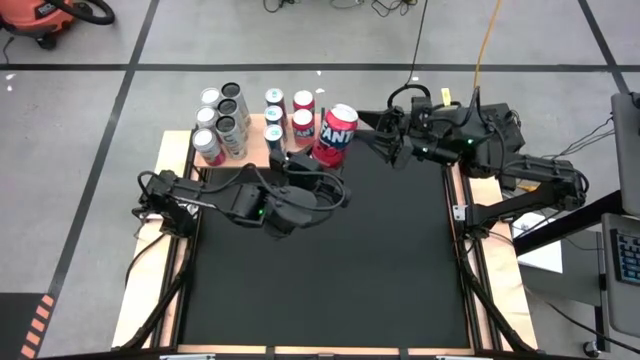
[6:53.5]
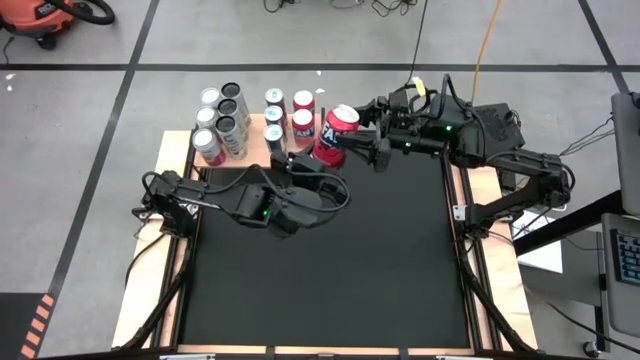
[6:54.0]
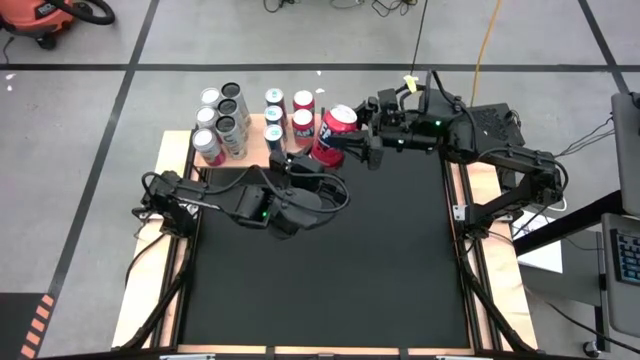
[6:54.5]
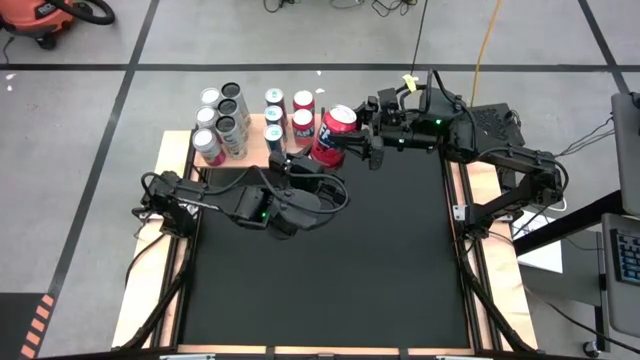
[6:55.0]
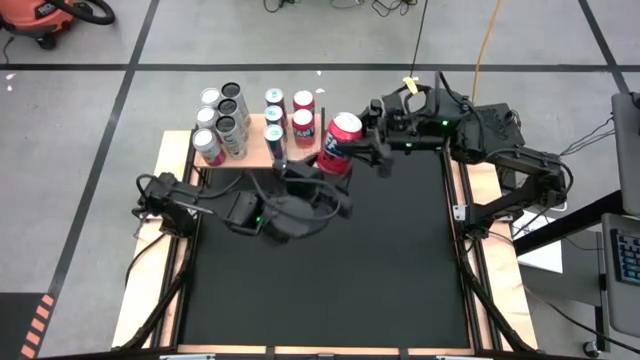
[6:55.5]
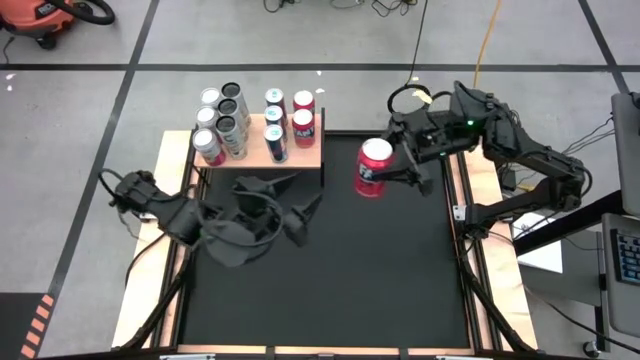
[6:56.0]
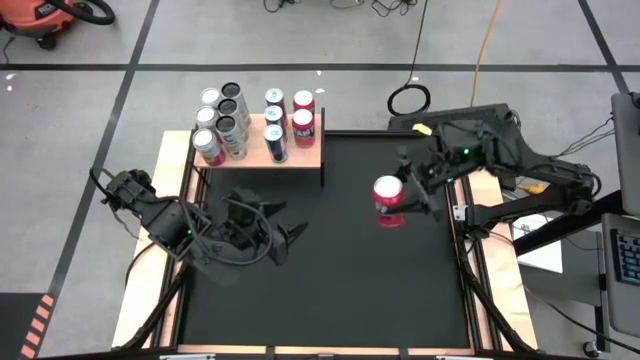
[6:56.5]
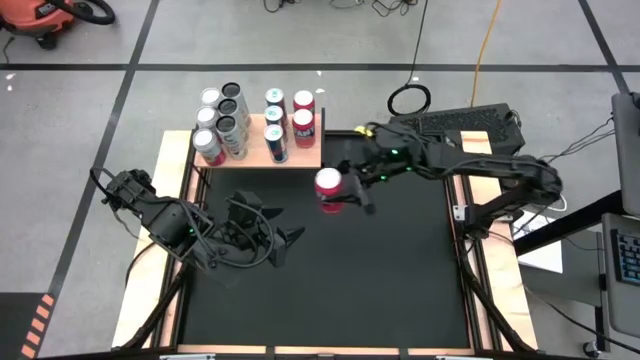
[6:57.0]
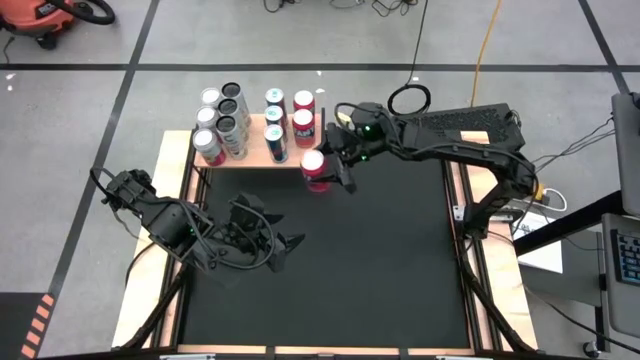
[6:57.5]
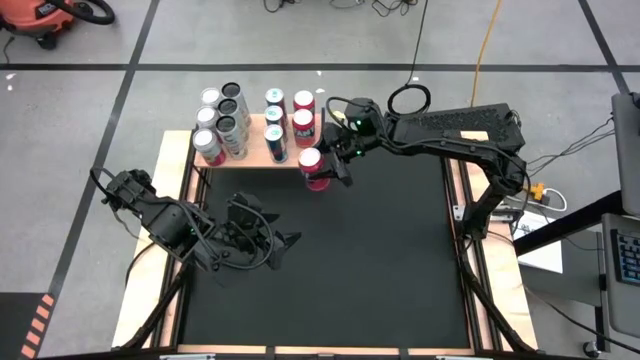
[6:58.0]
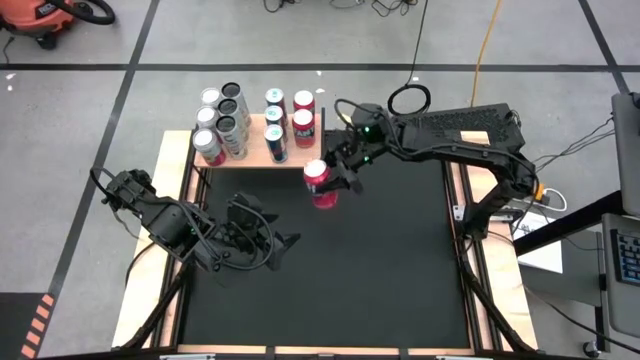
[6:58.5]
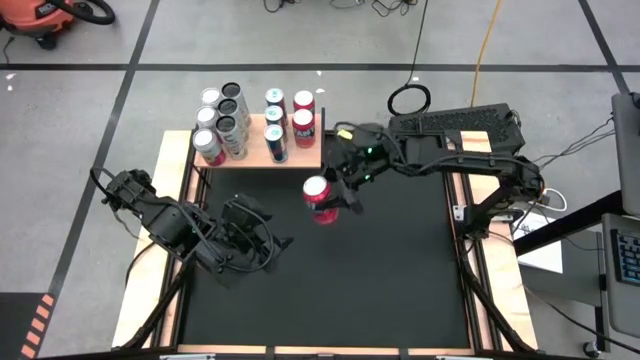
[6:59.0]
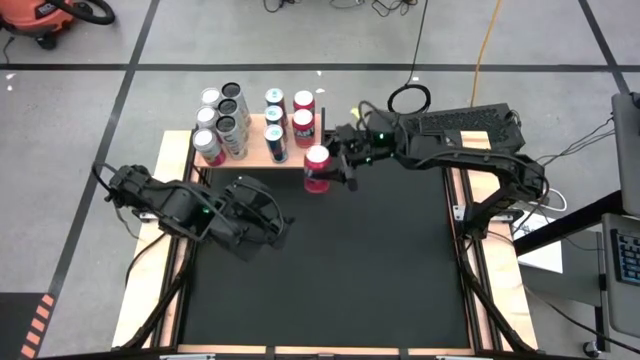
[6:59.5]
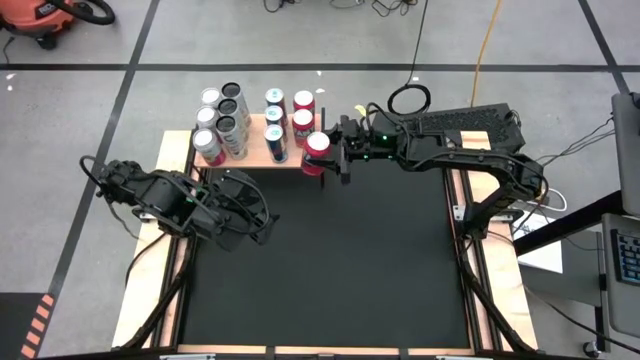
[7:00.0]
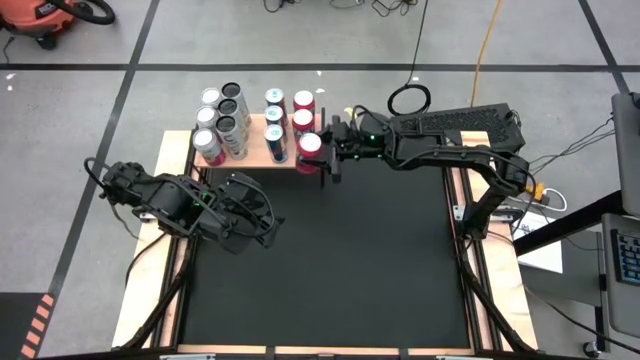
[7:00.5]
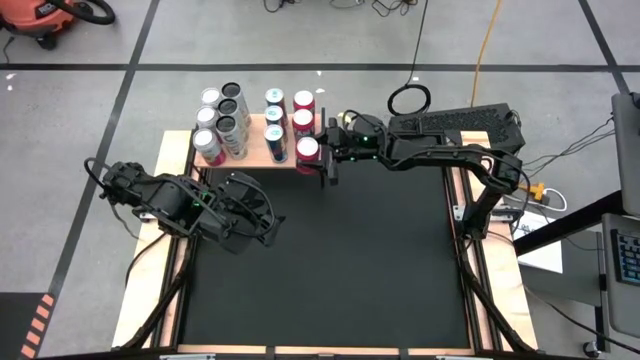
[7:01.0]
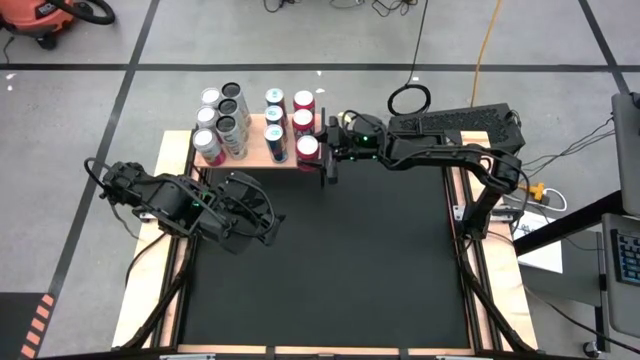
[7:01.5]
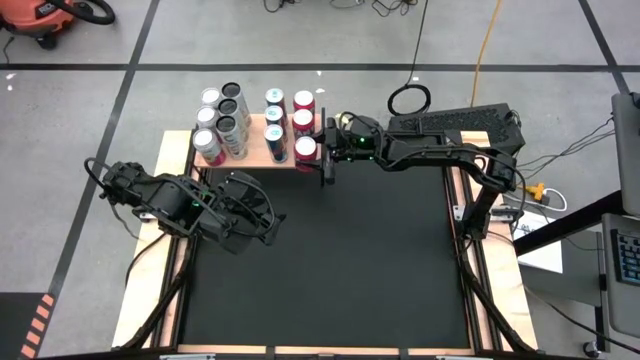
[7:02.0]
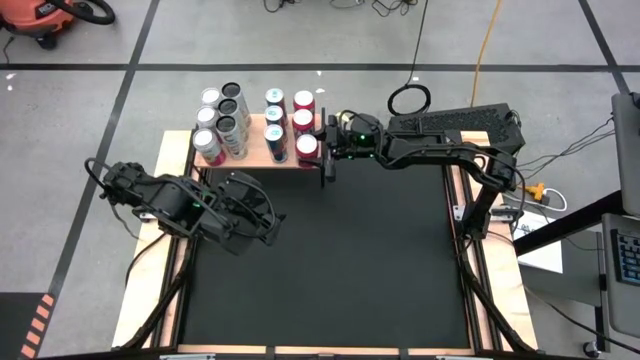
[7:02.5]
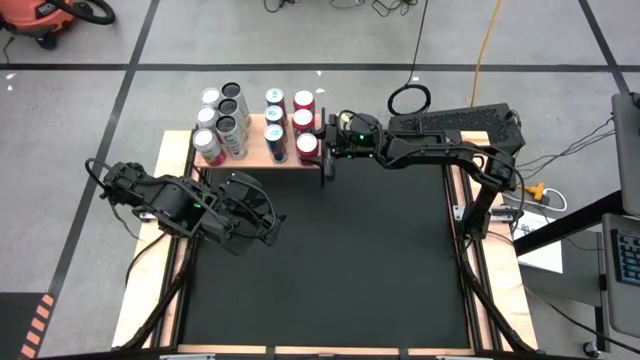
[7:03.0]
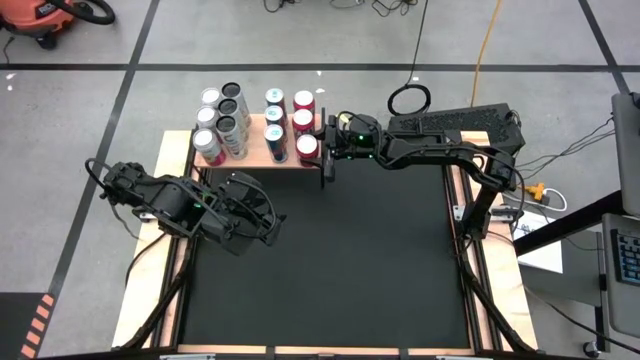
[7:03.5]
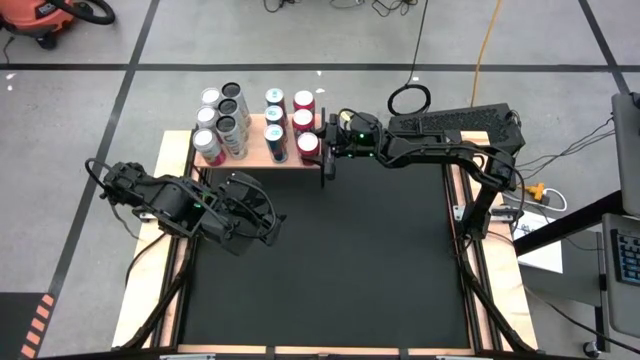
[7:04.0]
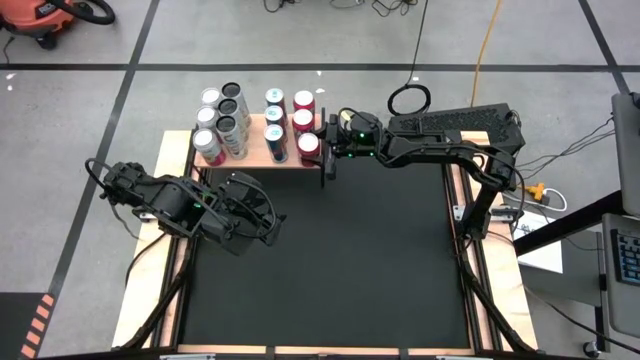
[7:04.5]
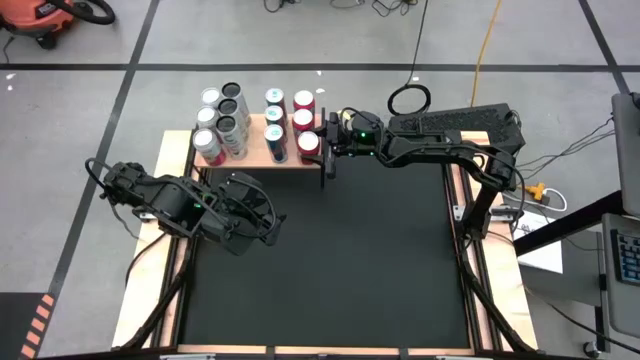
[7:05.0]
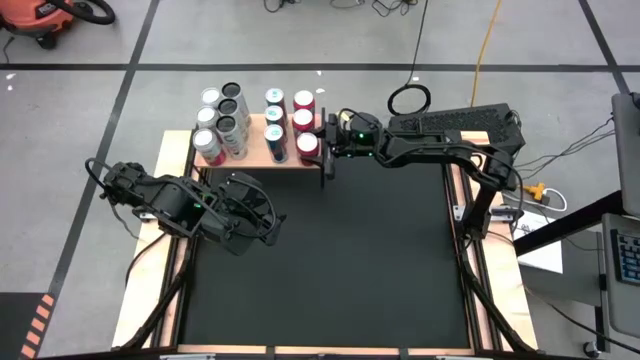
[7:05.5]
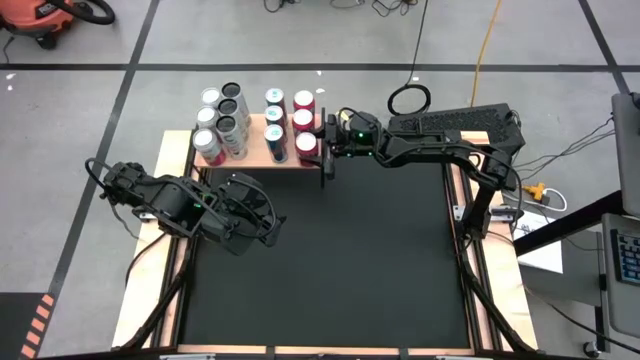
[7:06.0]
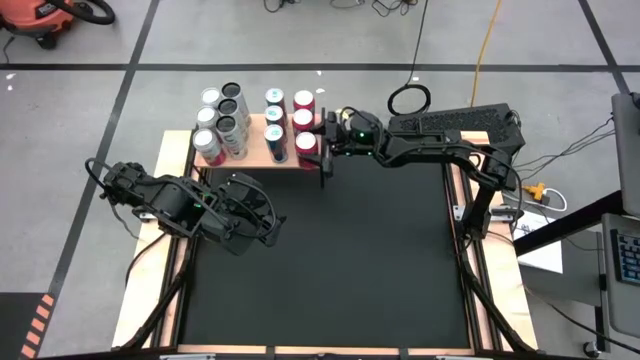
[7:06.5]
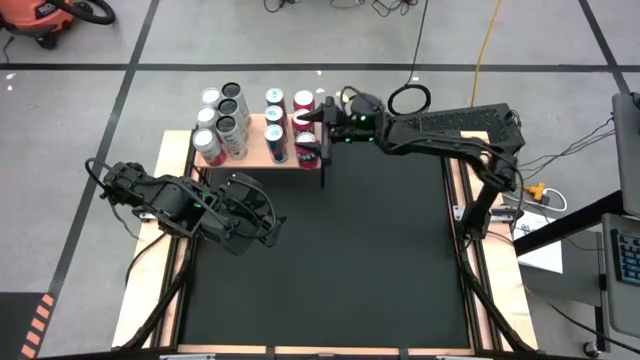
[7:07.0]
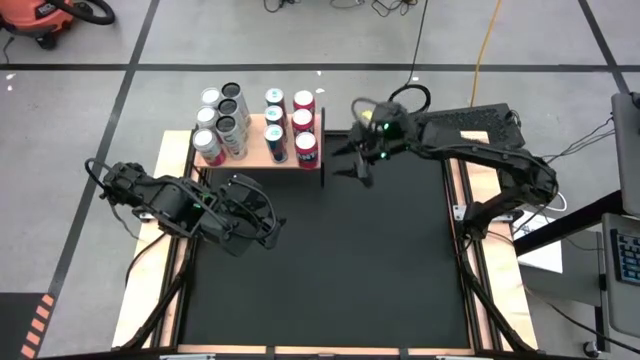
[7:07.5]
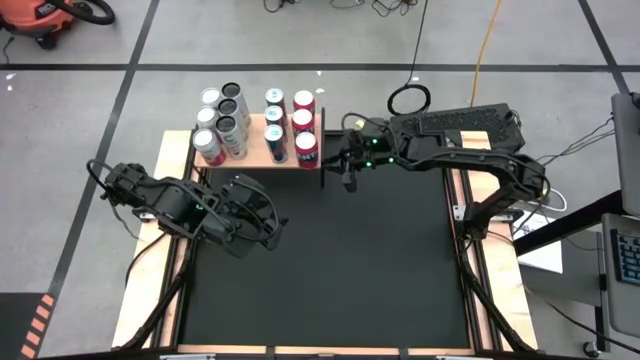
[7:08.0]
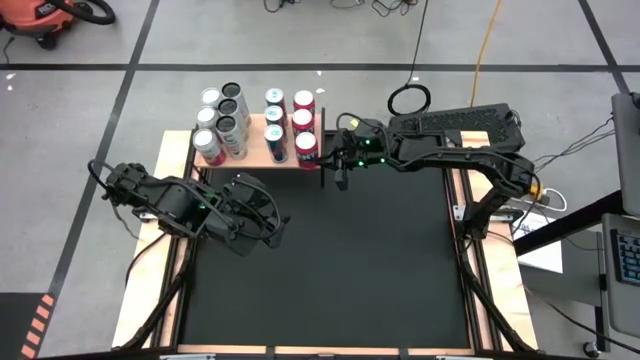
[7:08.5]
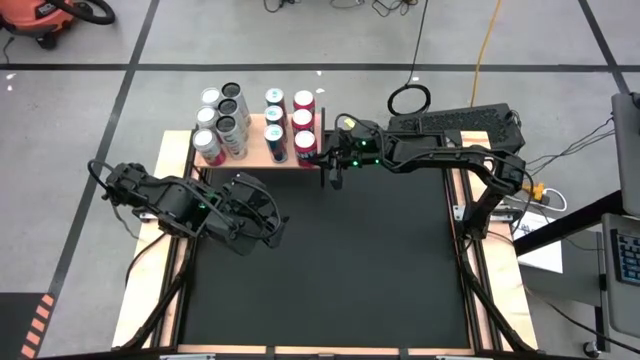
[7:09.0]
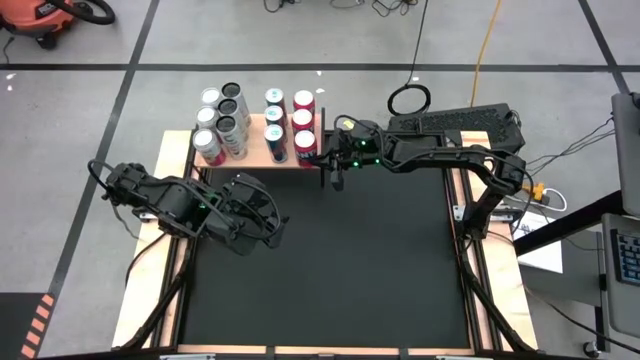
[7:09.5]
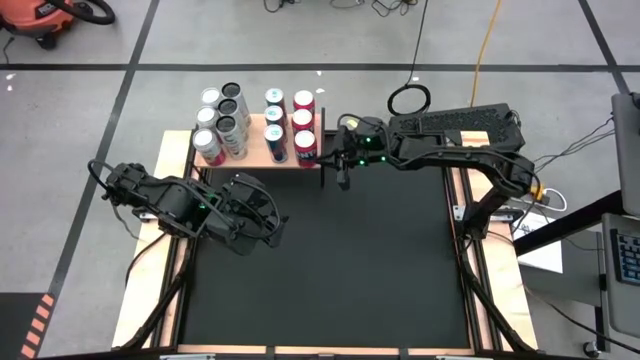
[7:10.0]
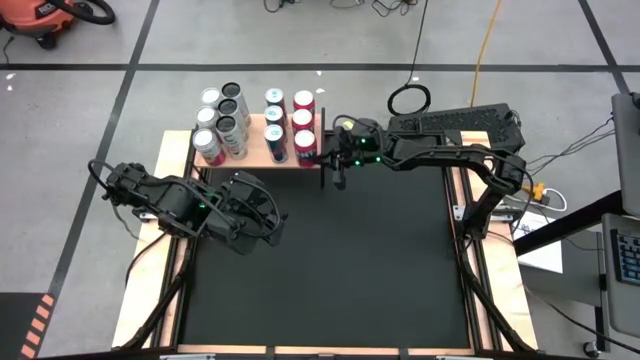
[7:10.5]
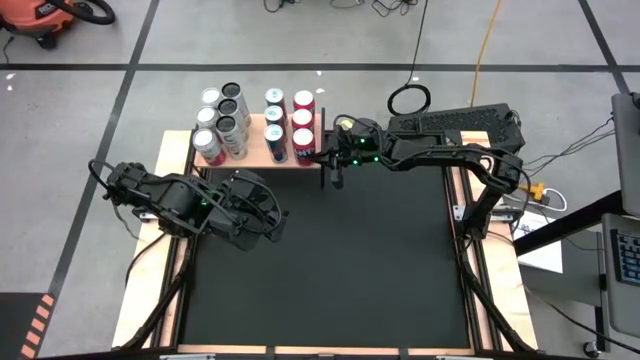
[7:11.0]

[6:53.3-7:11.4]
Task: Place canned beverage on shelf
Put the red soda can on the shelf aligned with the other red soda cans

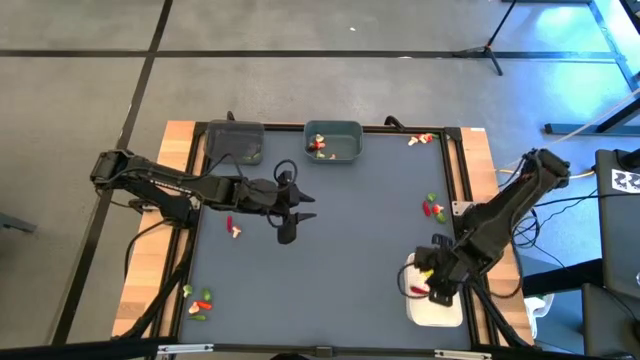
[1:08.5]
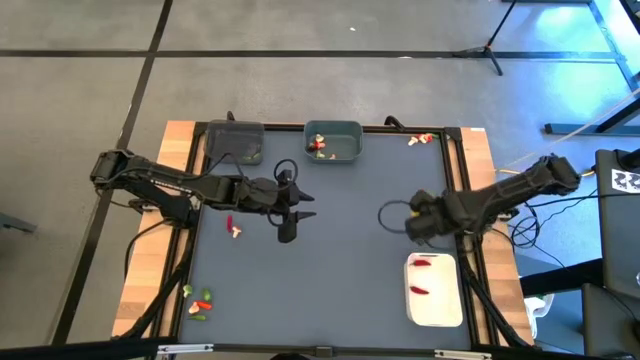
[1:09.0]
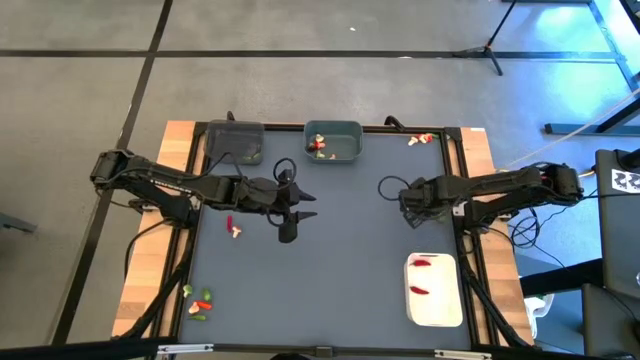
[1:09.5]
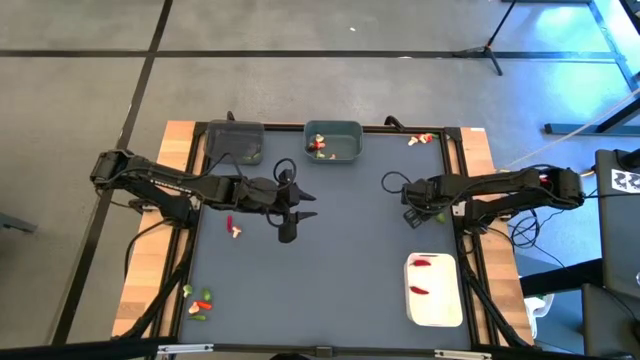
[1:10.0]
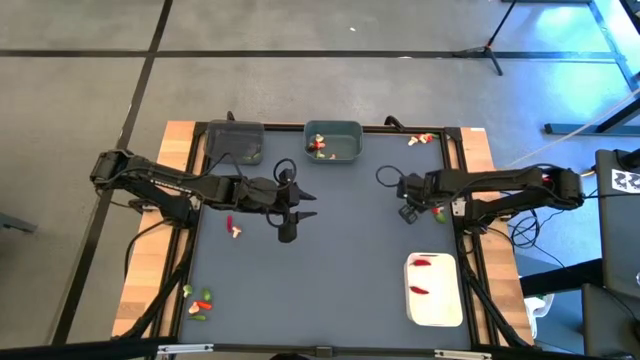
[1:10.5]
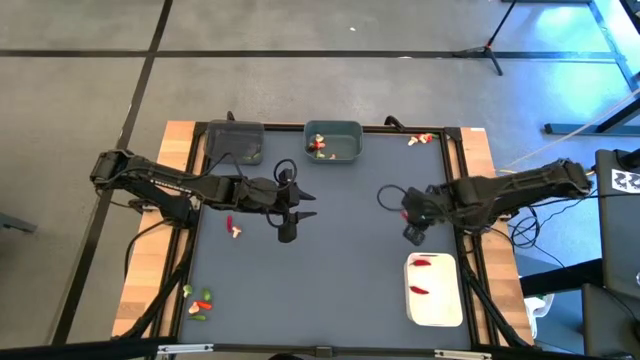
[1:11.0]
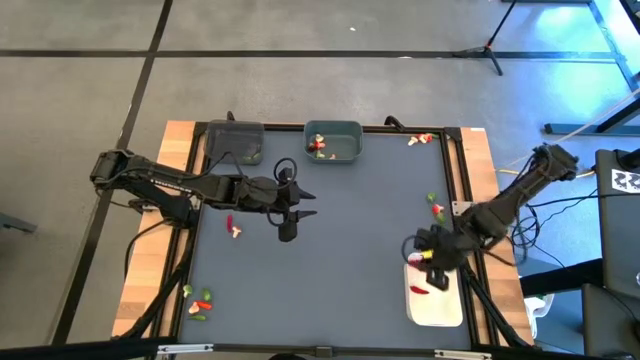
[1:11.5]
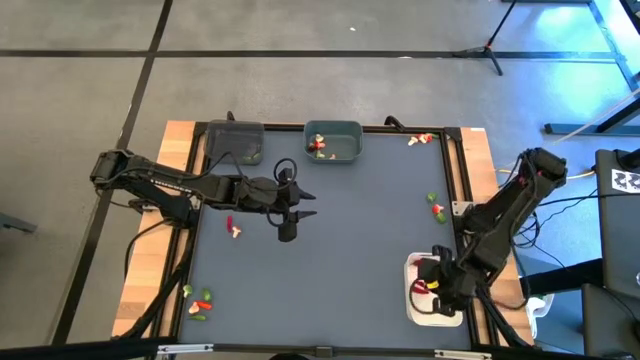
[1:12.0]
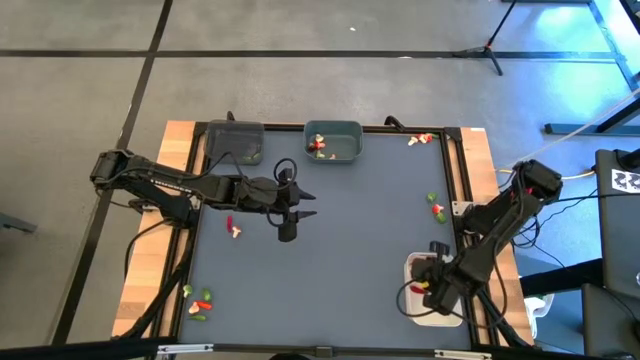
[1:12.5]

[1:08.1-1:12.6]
Task: Sort produce into baskets
Put the red chili pepper into the white bin
